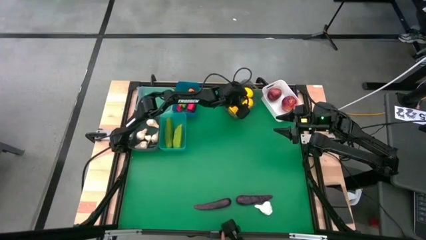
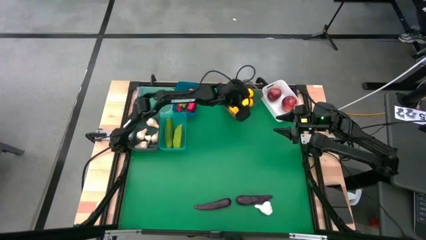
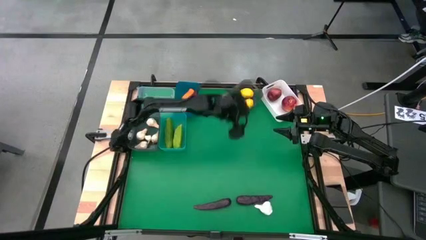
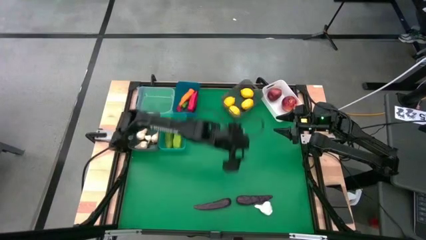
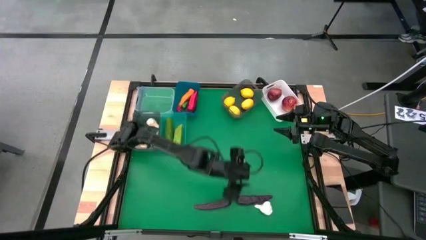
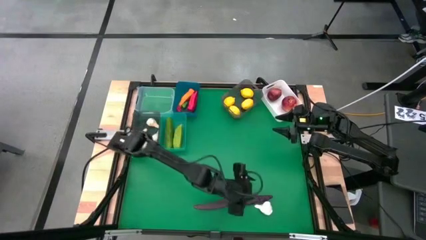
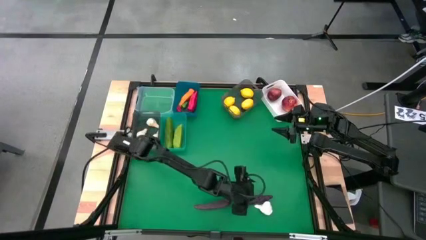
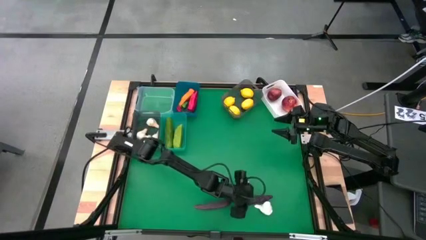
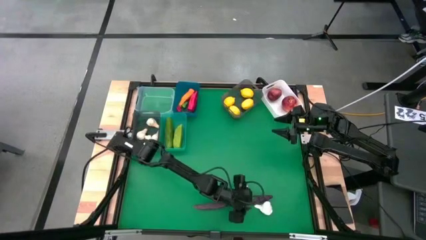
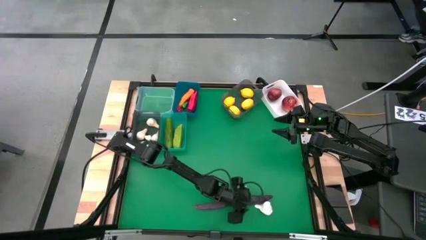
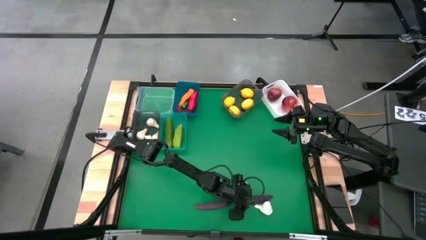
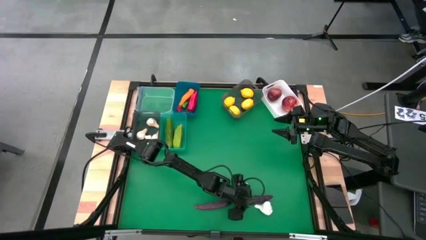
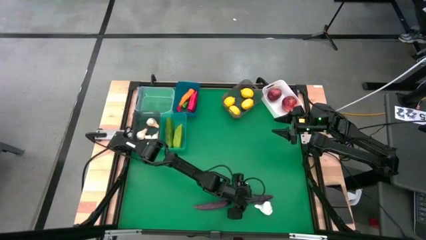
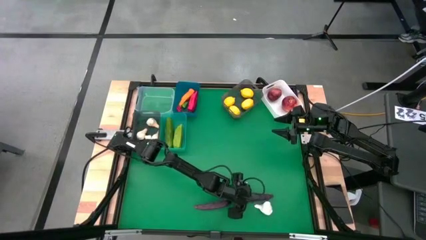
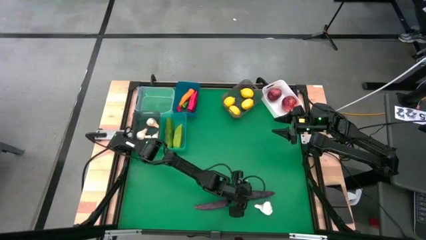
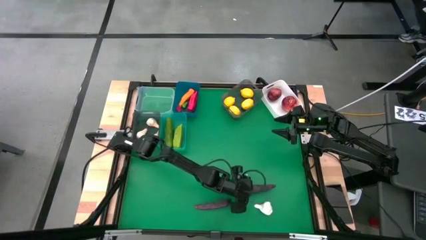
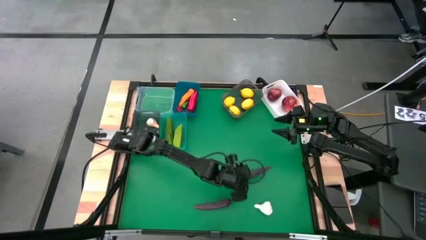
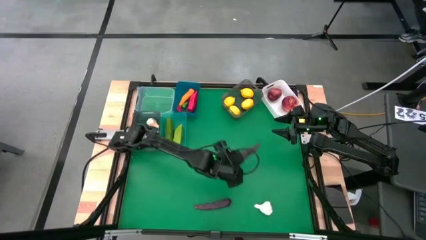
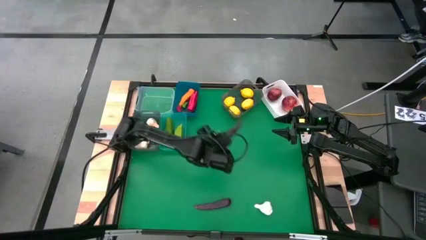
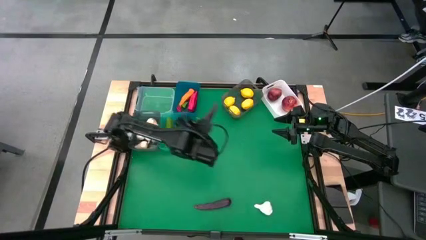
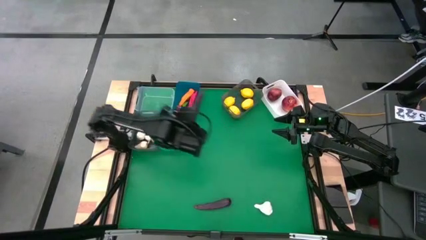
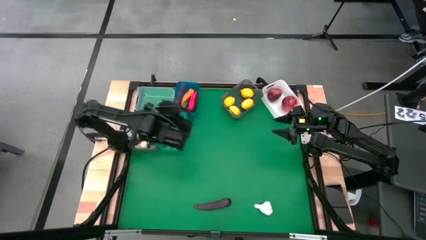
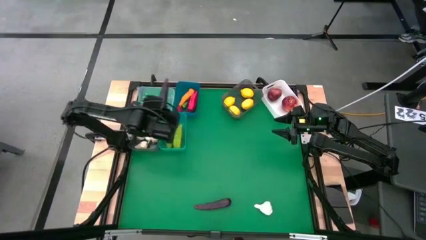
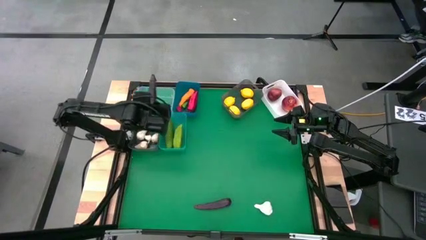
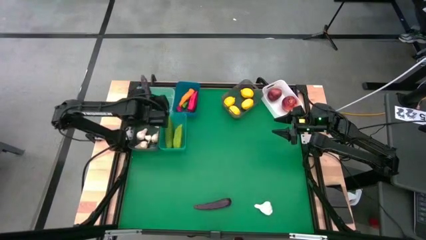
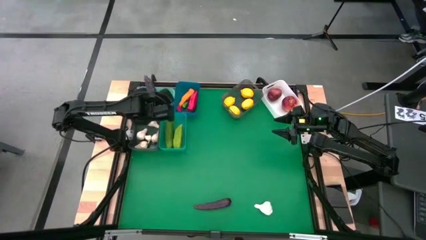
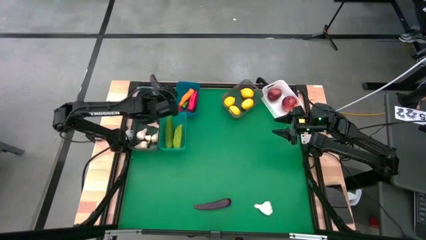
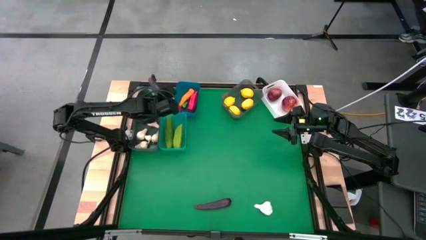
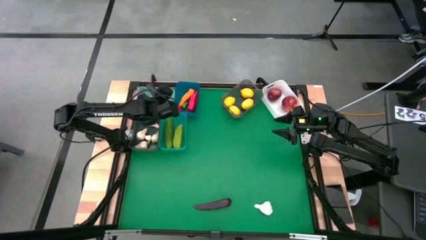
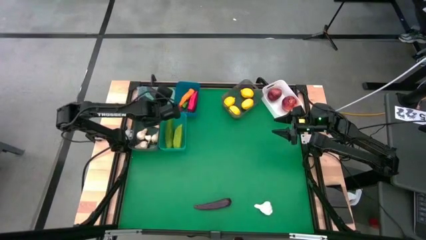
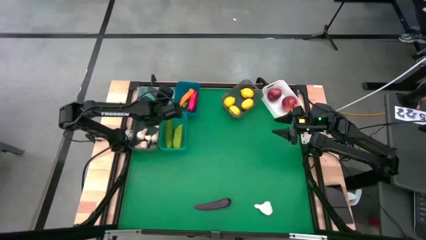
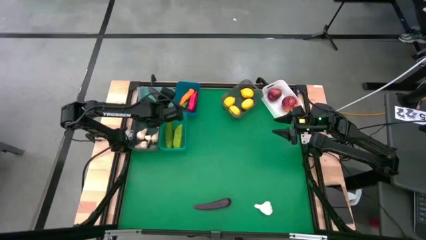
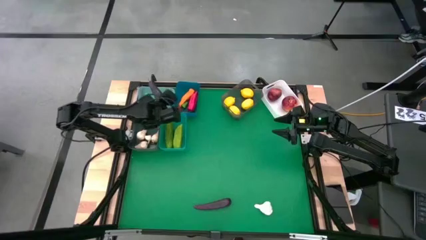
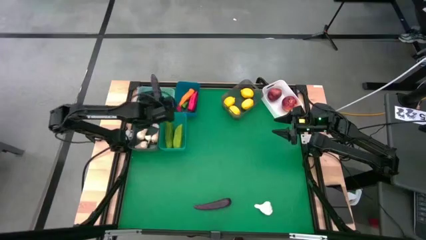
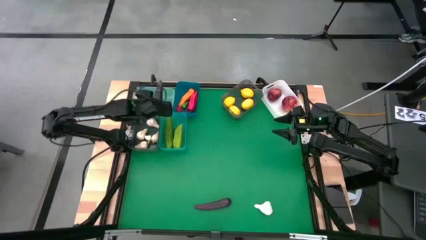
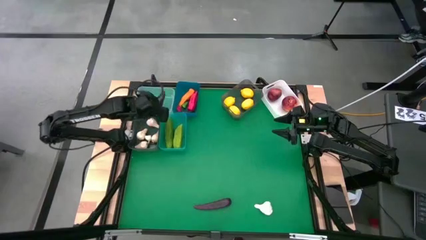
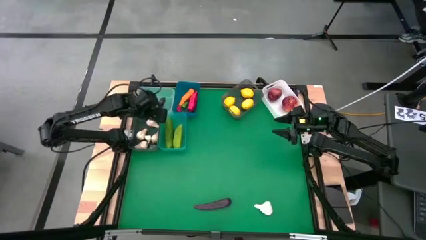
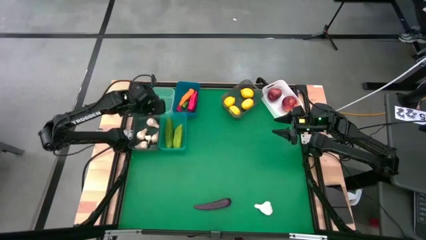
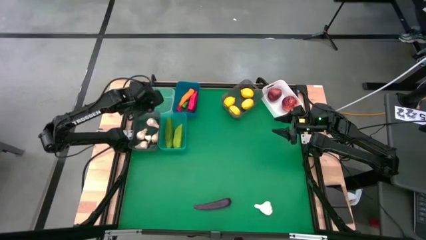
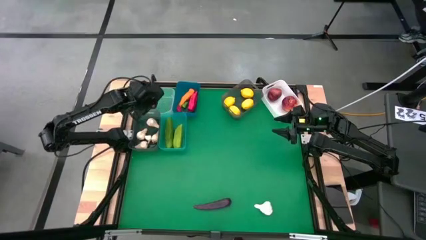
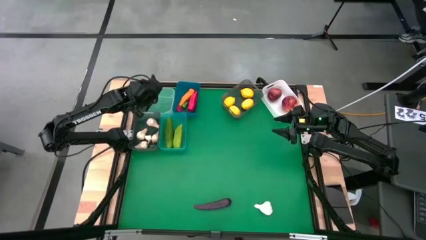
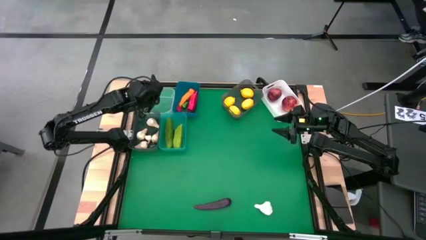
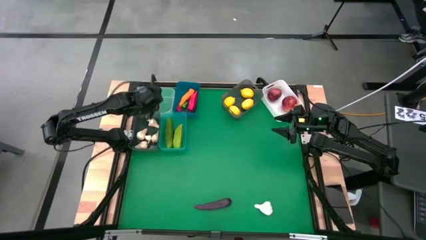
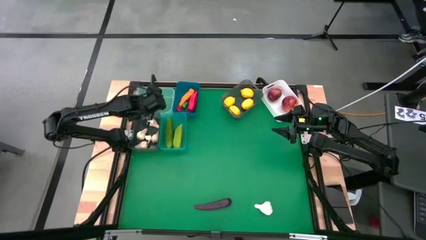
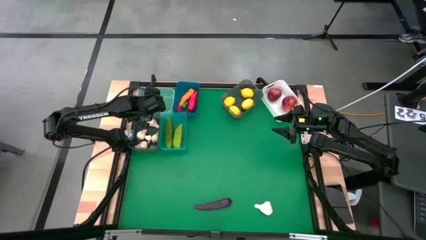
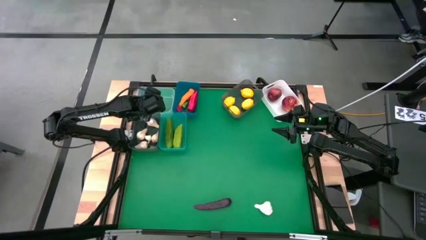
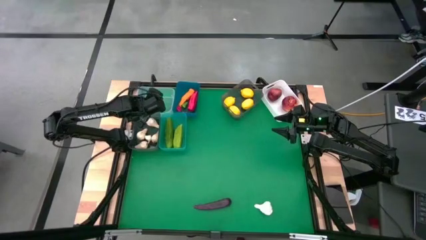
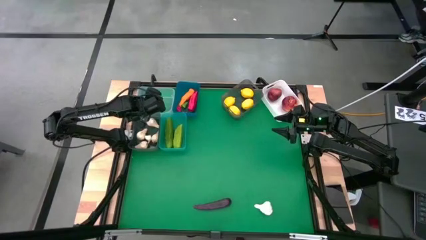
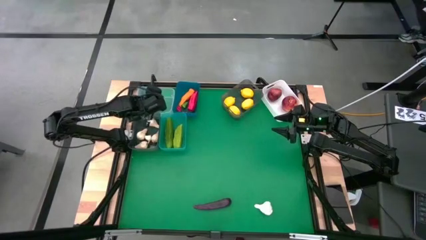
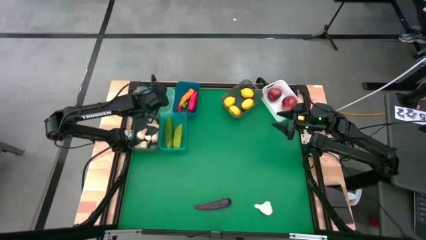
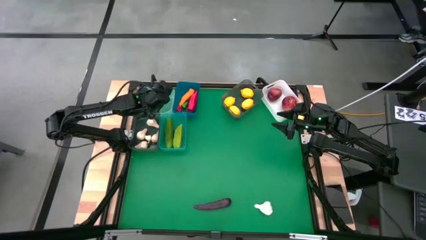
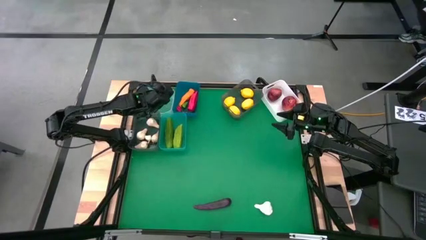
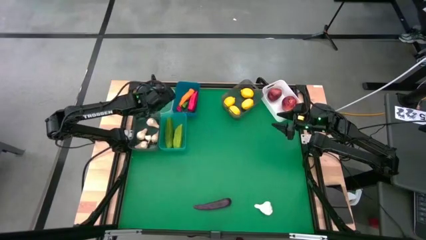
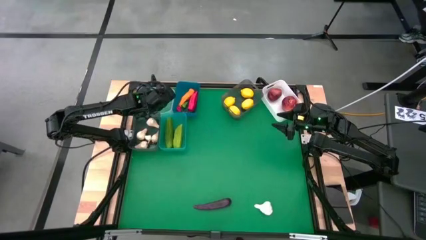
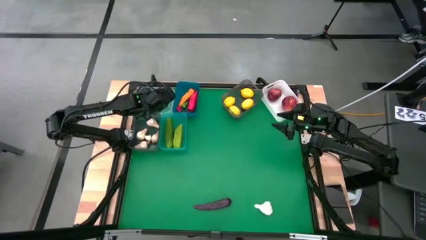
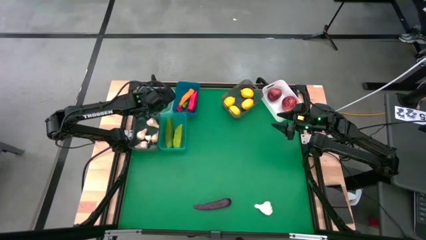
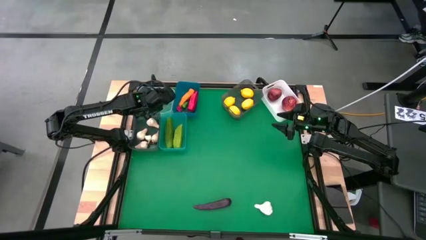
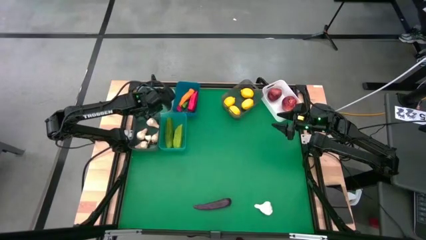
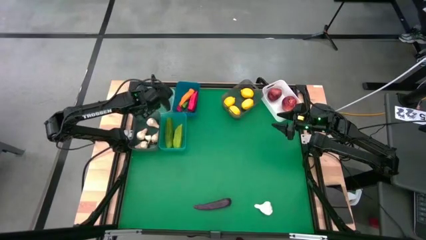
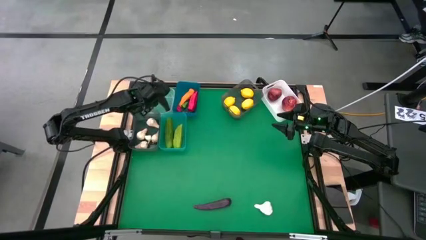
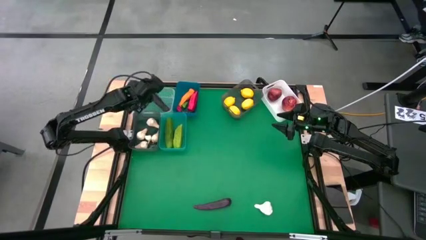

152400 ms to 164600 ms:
Task: Sort produce into baskets
Put the purple eggplant into the transparent bin

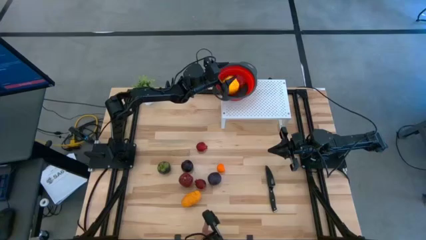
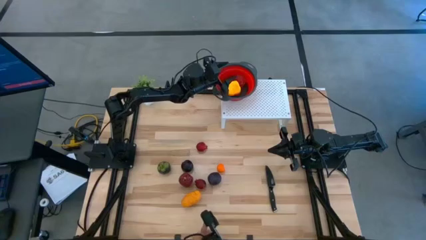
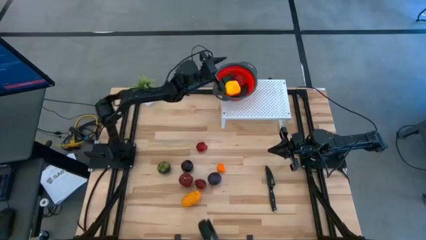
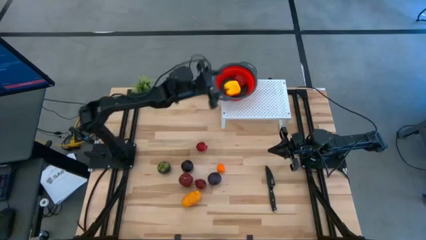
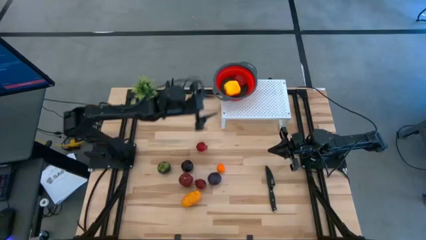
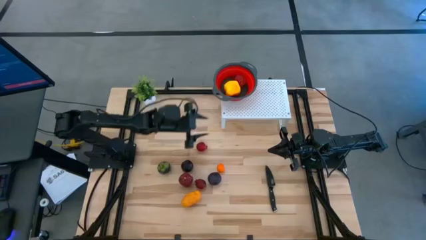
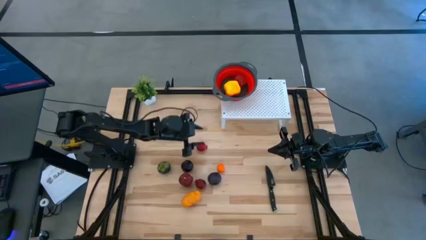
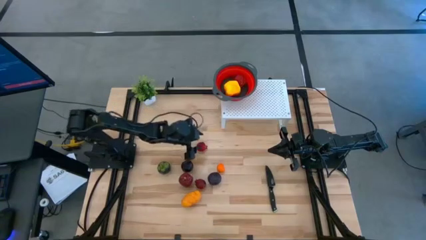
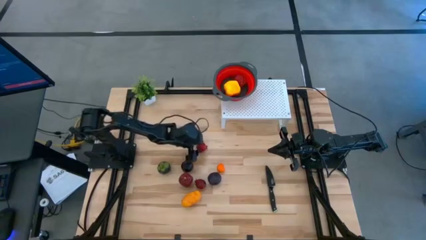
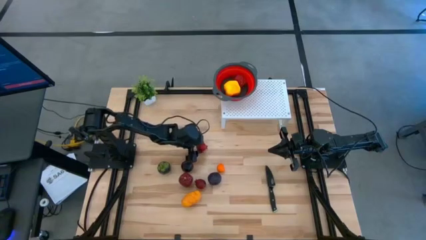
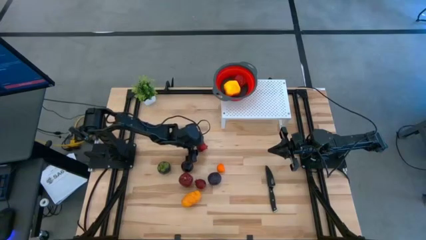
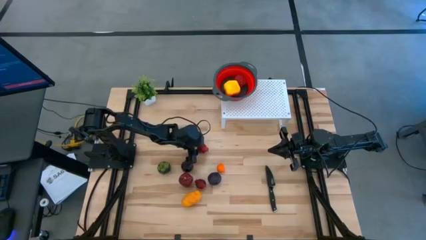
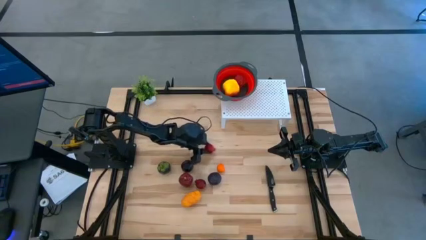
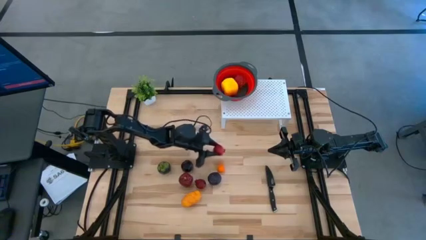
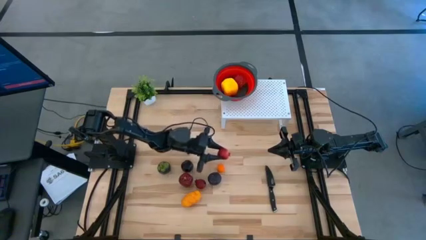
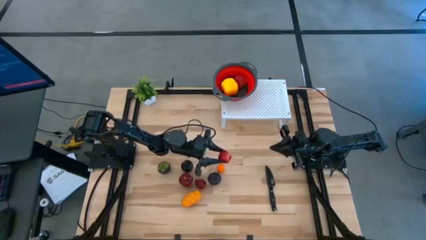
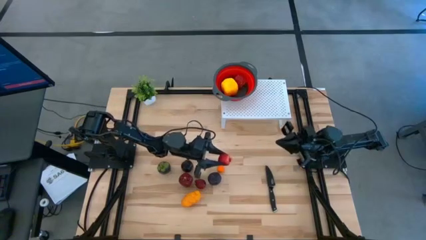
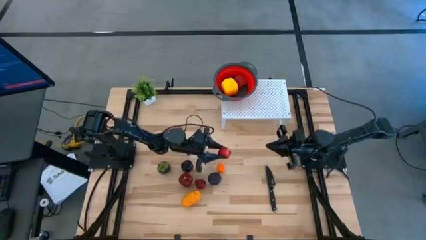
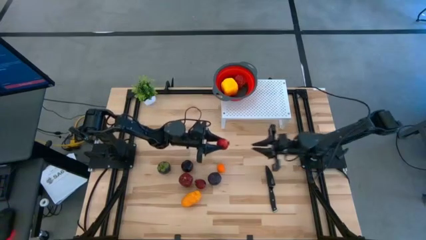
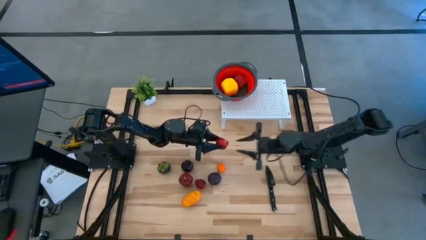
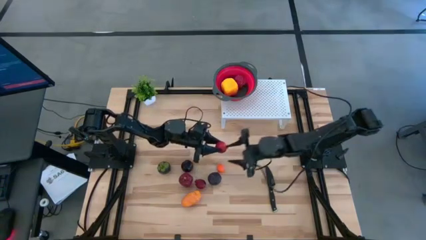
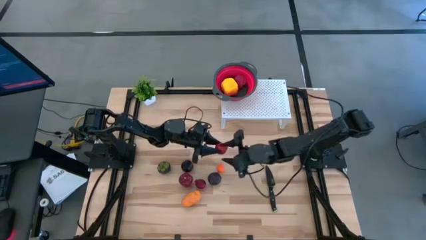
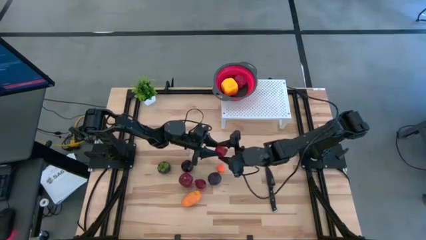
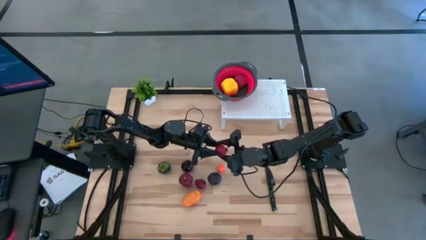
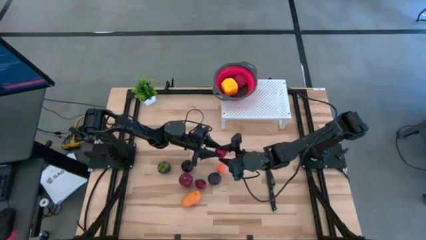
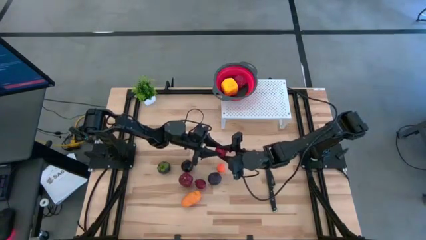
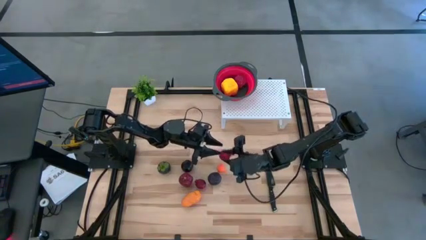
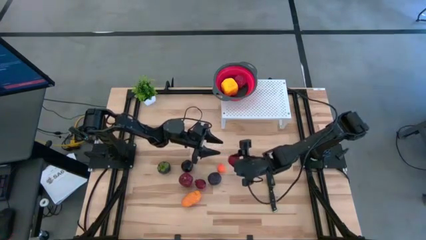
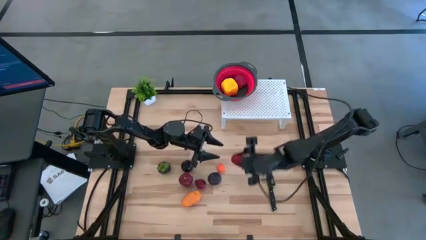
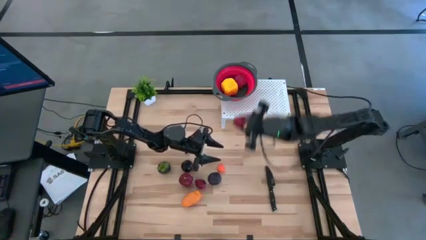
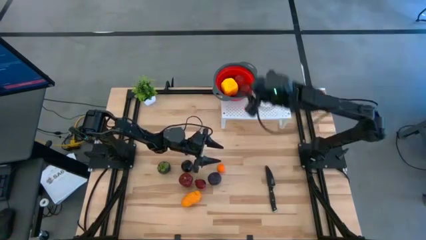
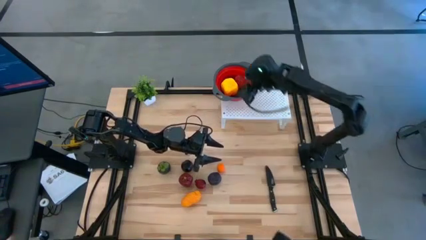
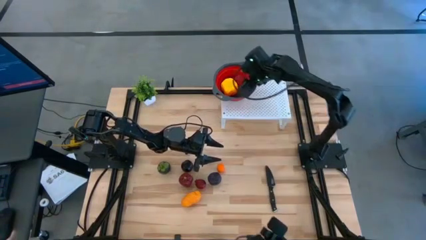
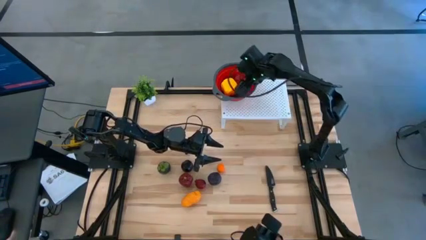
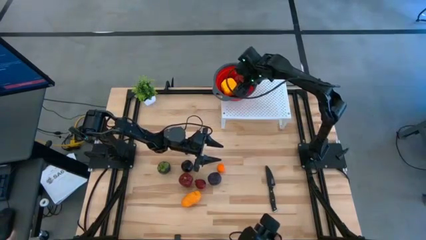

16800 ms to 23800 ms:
Task: Pick & Place Fruit
Put the pomegranate into the red strainer bowl
